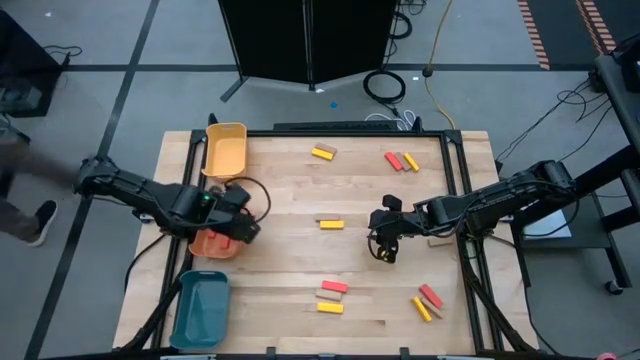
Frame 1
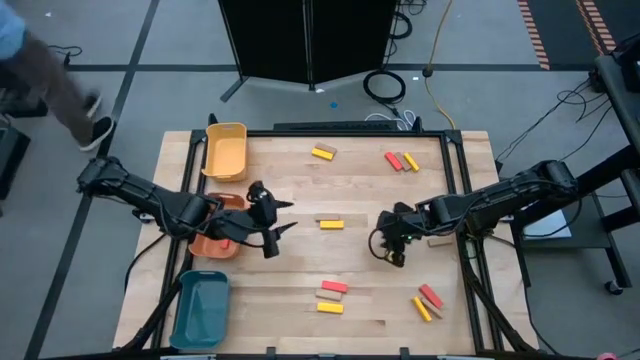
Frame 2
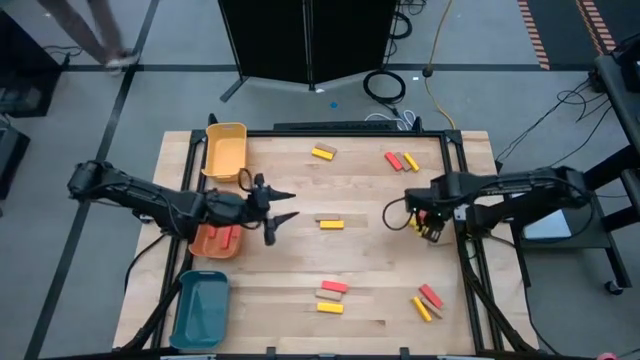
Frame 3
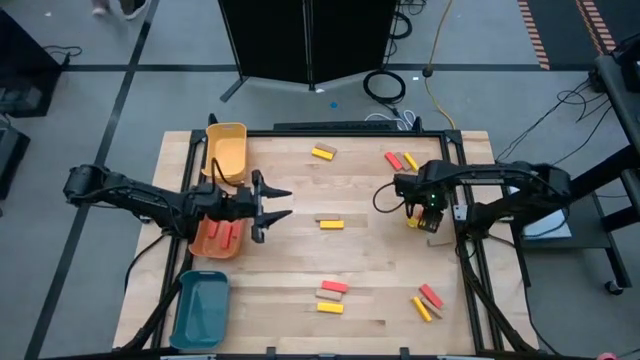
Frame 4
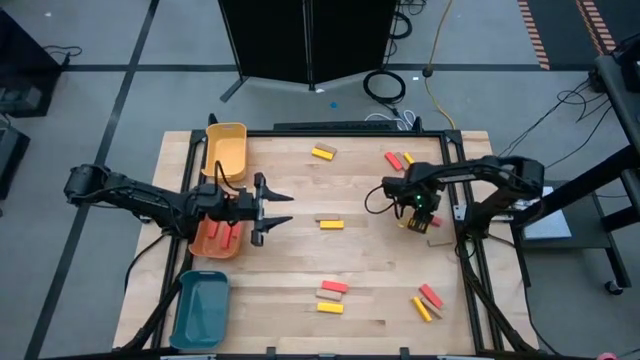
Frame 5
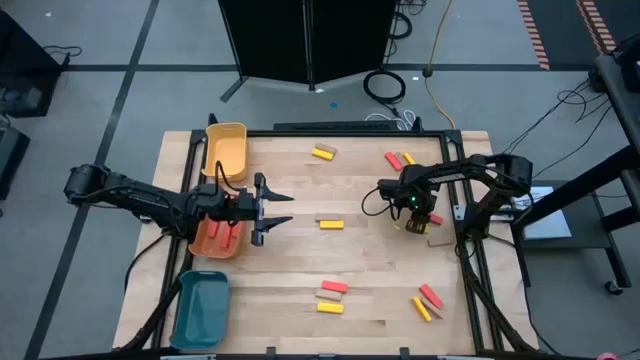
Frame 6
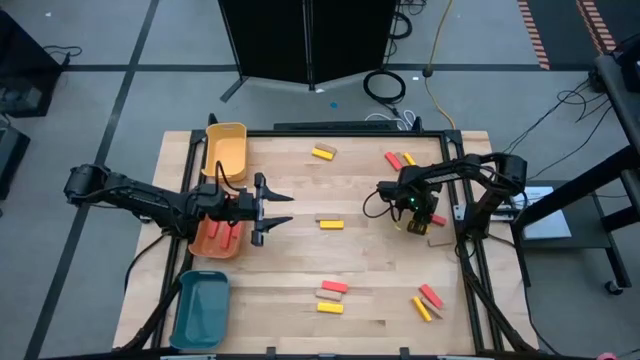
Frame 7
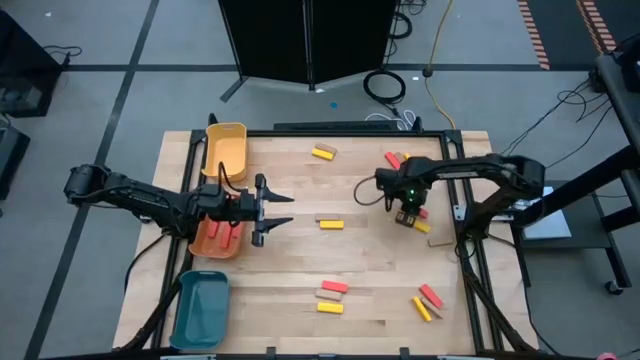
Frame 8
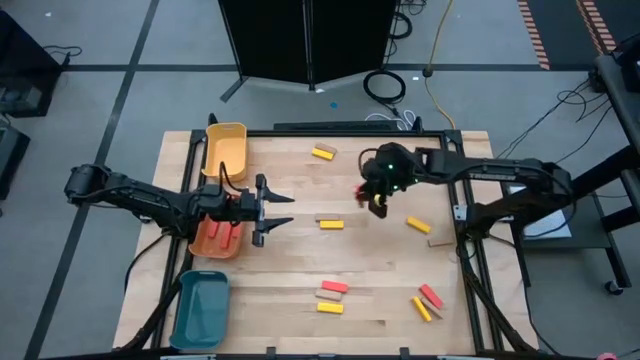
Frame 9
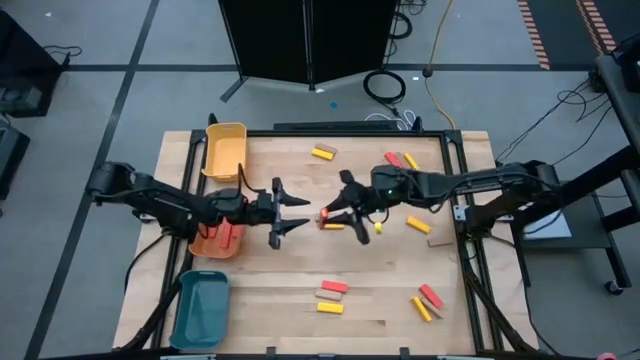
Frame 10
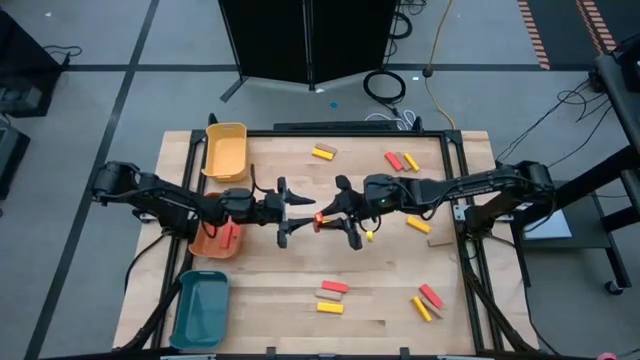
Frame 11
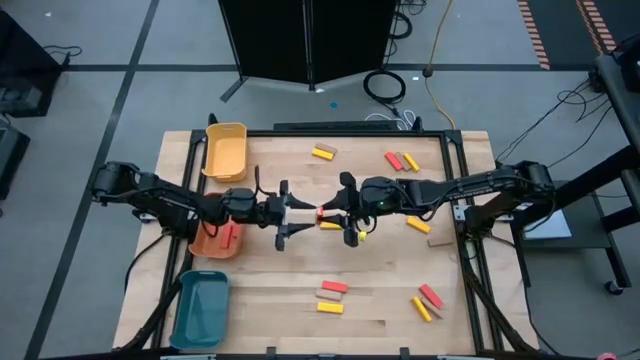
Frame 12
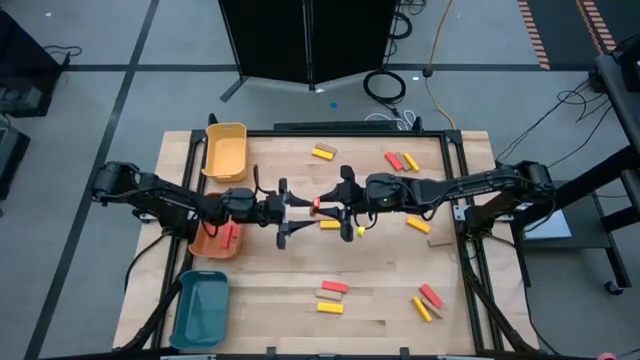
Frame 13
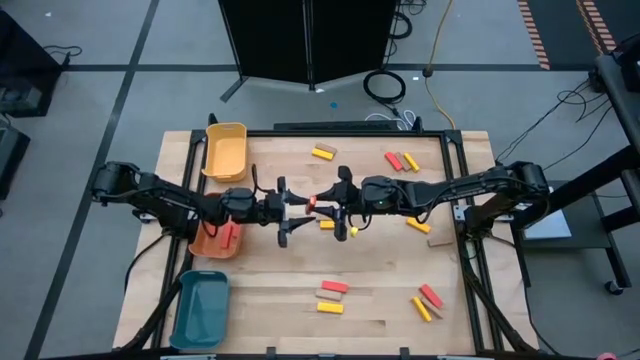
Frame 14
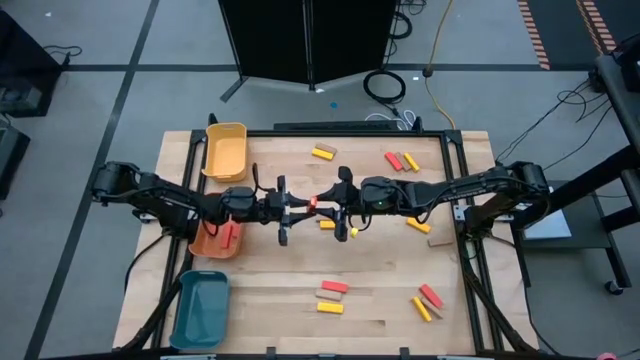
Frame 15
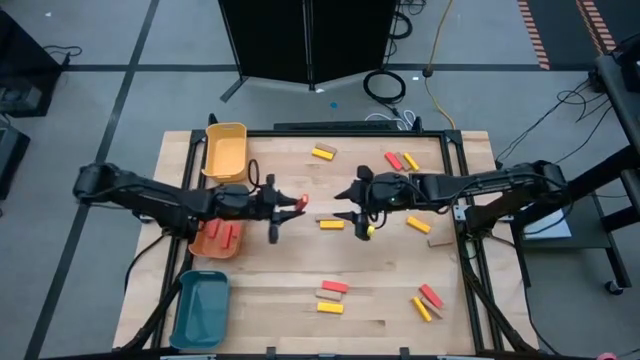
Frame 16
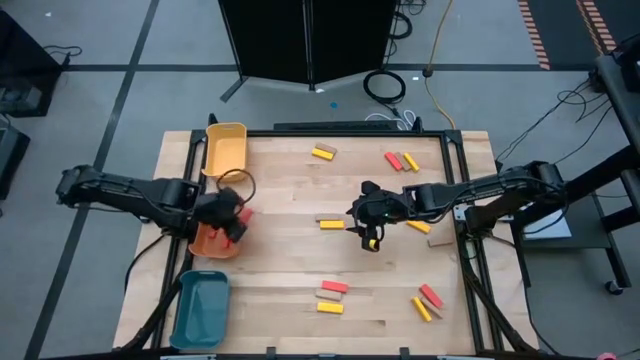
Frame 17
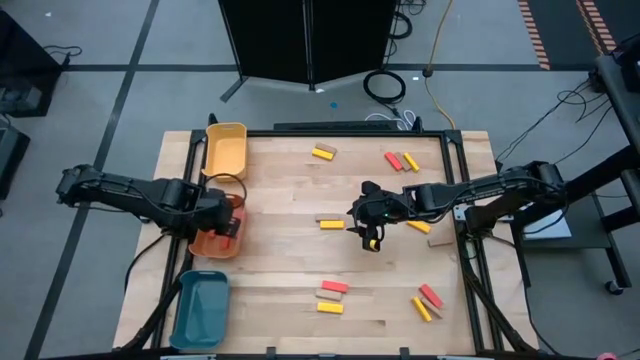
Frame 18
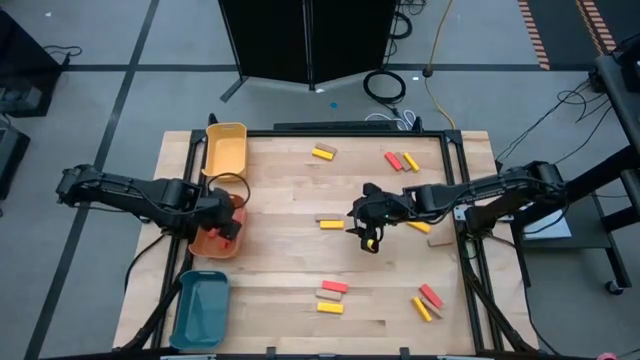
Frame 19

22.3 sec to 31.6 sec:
Task: Sort blocks
Put the middle right red block in the orange bin

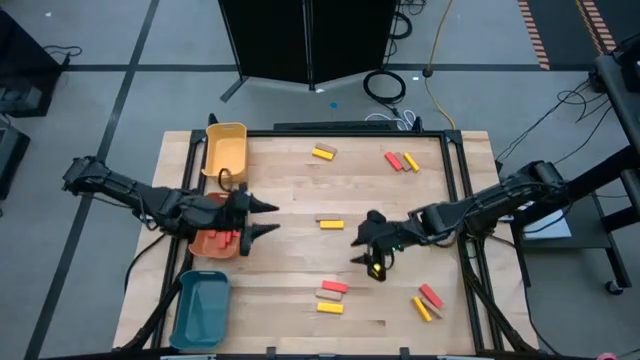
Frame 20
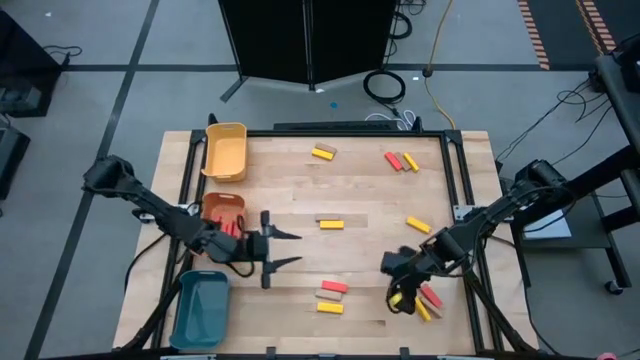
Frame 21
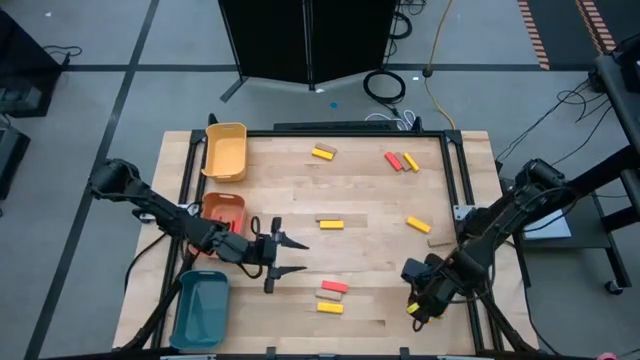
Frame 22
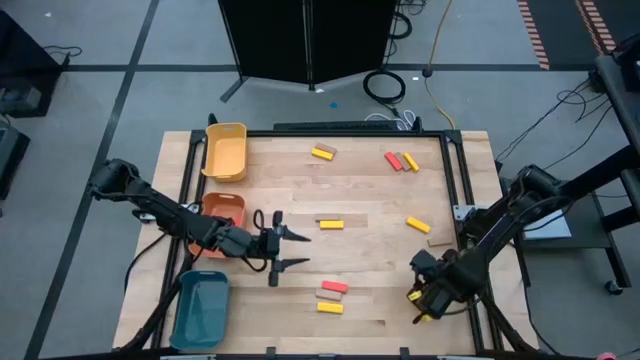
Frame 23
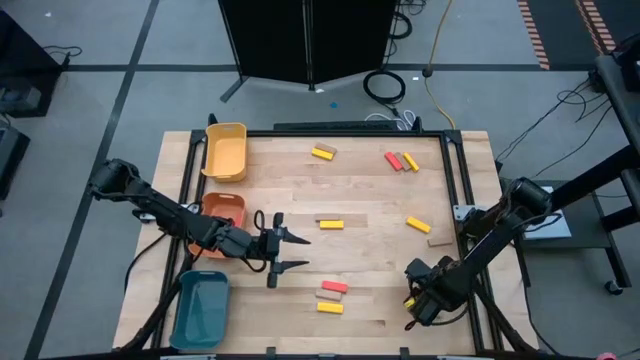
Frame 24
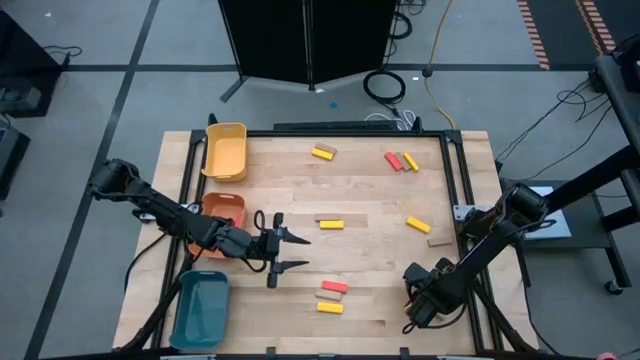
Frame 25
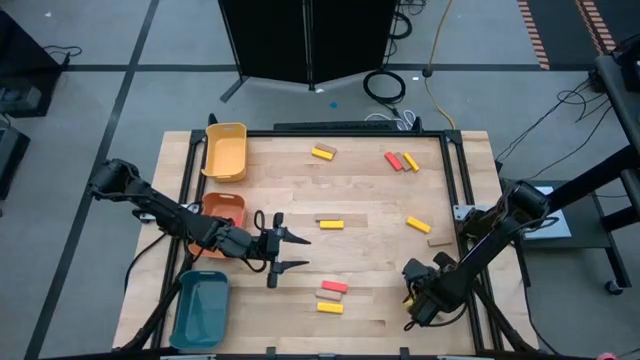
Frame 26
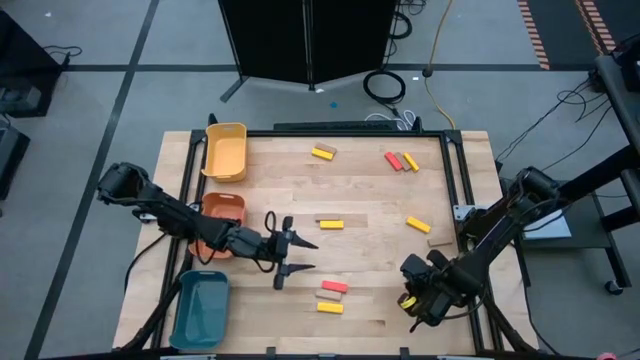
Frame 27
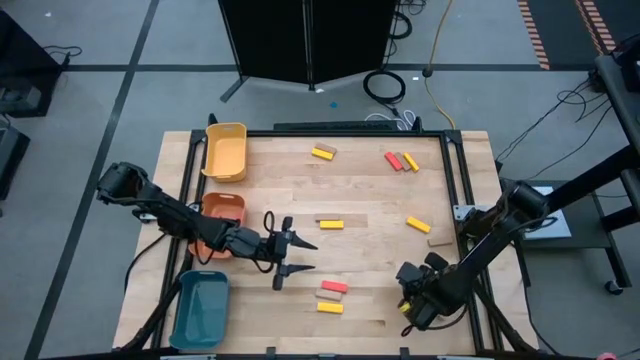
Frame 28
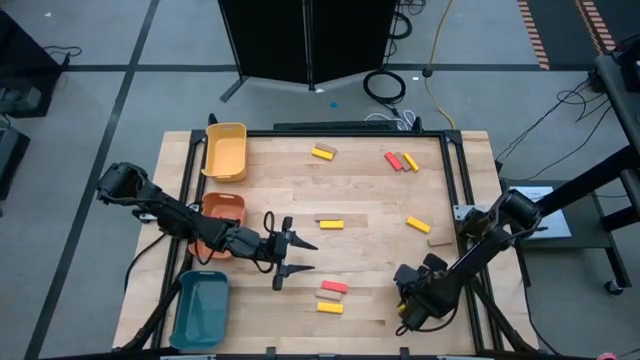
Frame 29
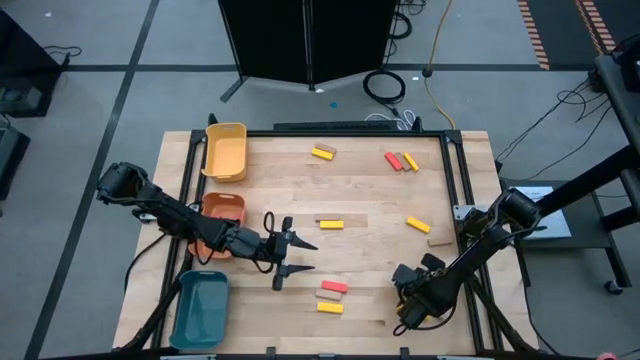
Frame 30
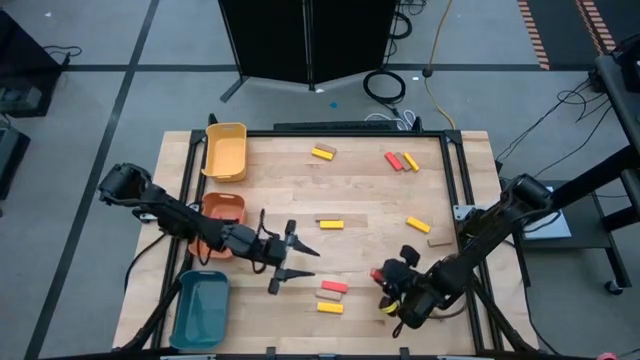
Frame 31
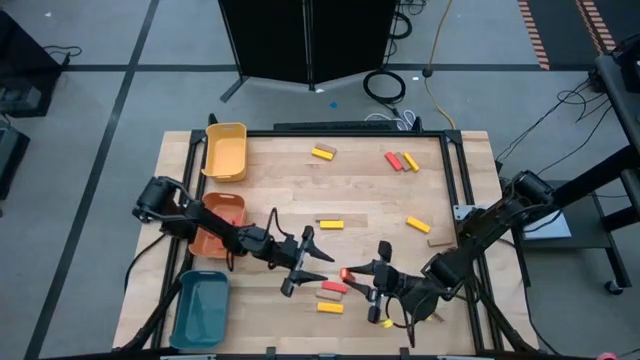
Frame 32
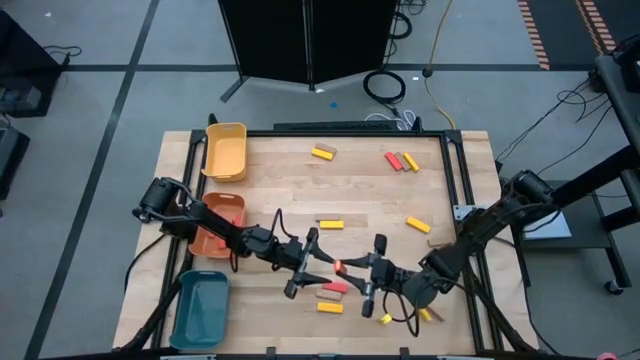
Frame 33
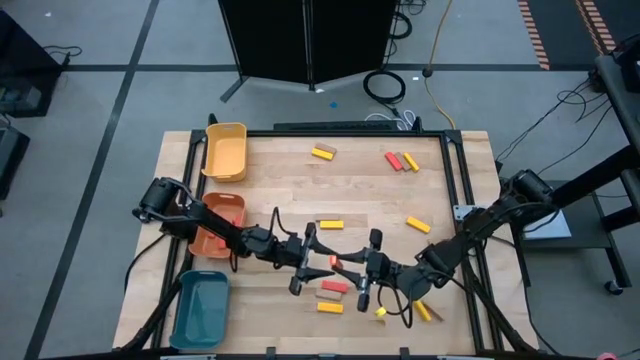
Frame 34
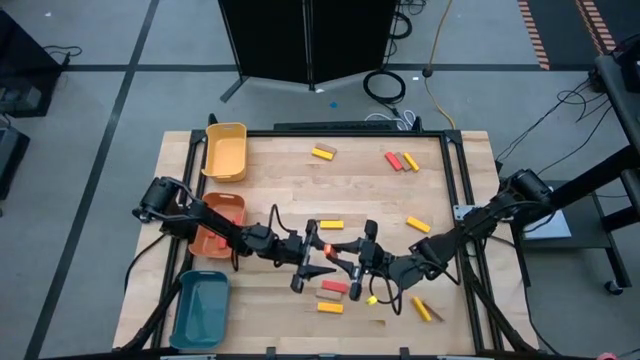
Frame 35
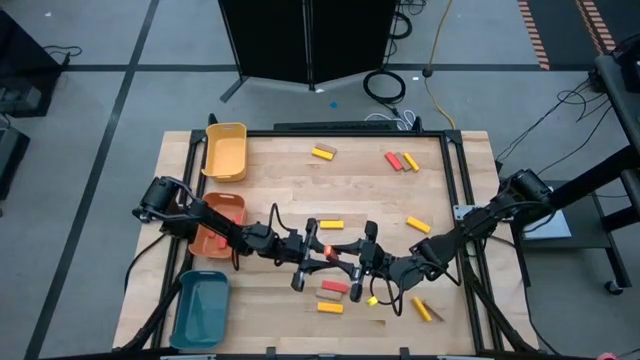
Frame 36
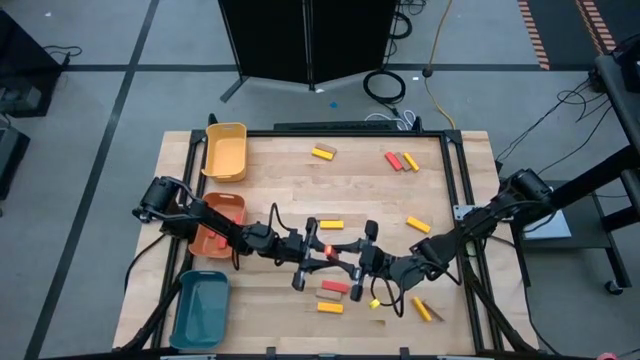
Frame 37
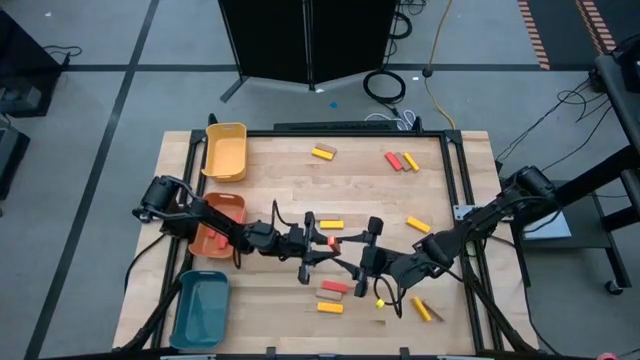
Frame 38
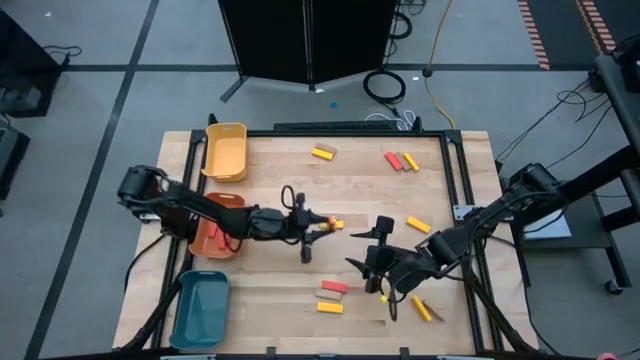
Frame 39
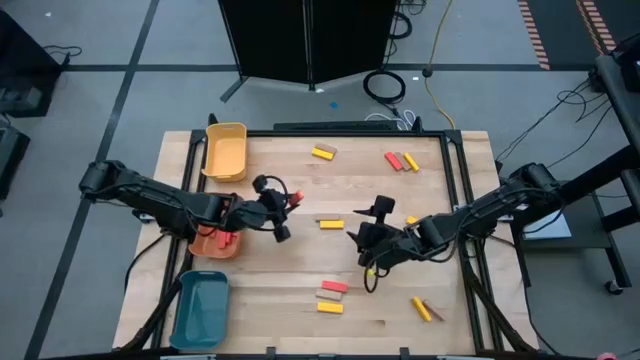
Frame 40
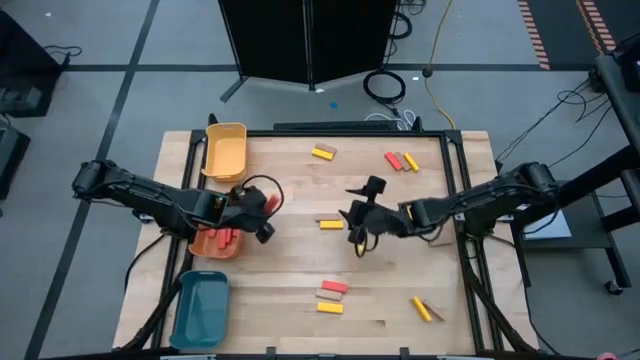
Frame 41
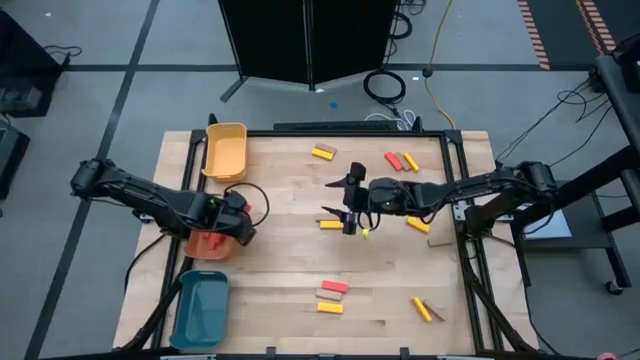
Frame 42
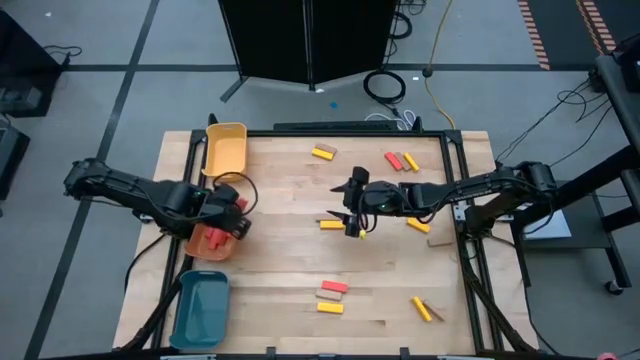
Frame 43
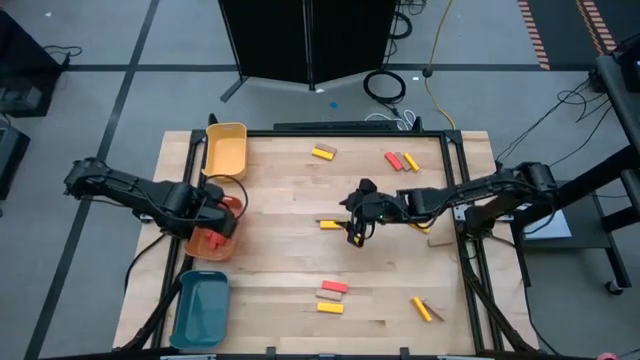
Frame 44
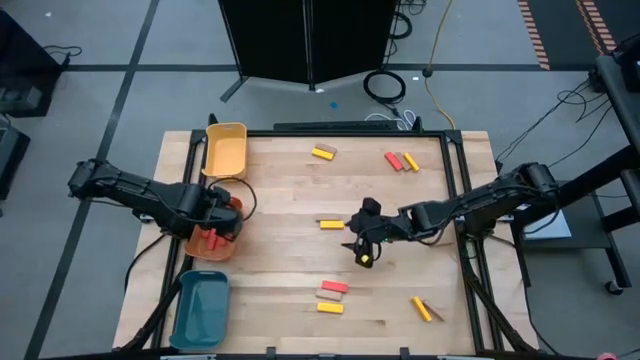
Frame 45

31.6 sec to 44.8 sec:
Put the bottom right red block in the orange bin
